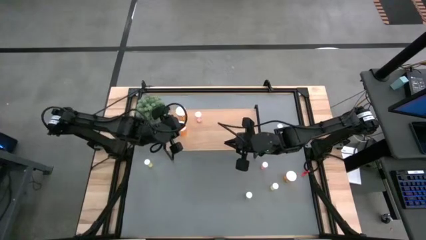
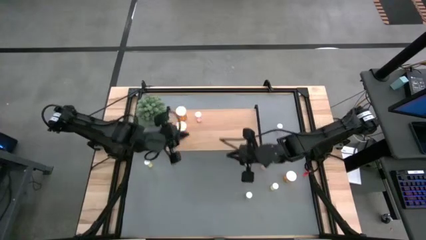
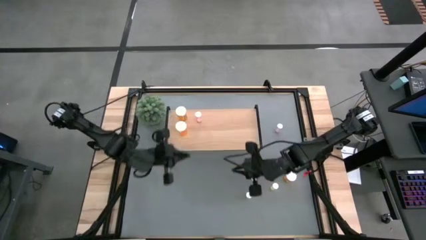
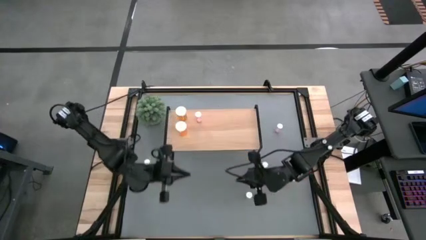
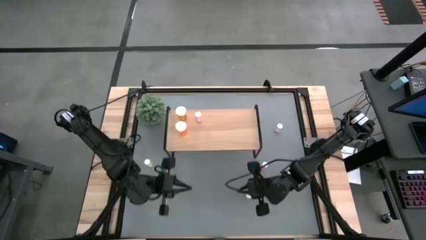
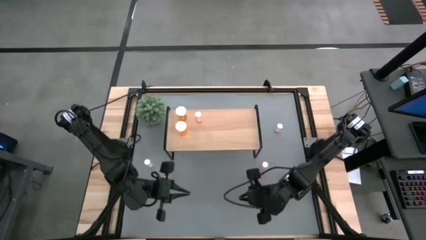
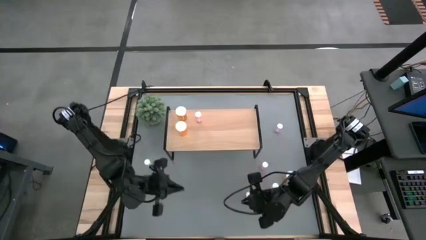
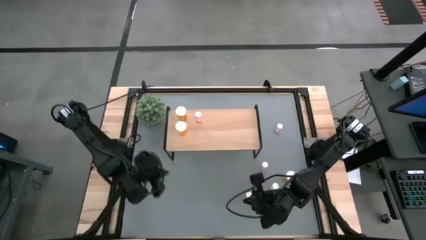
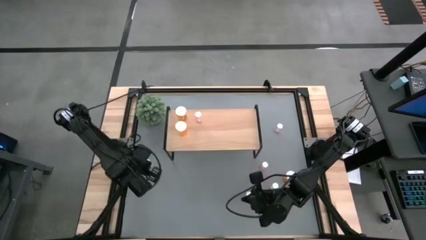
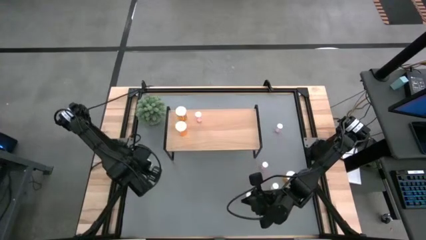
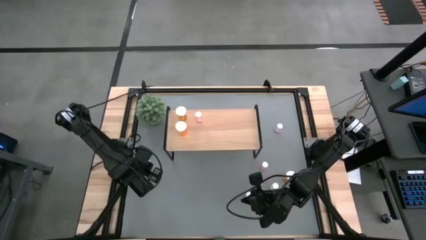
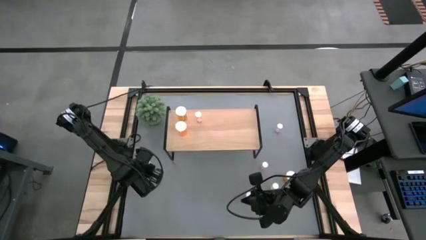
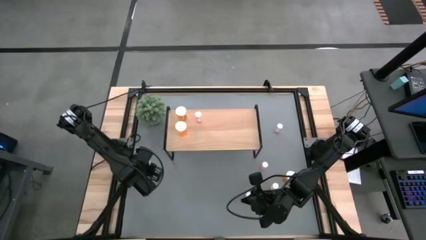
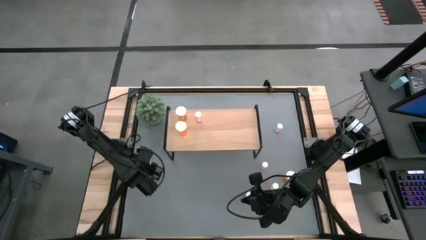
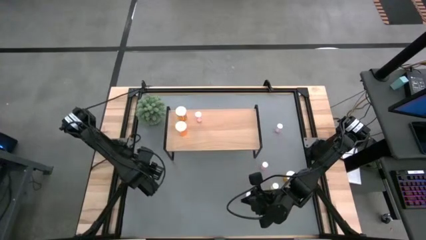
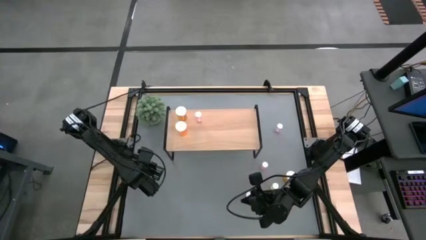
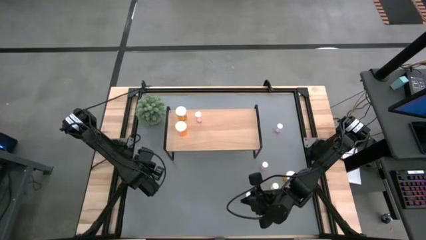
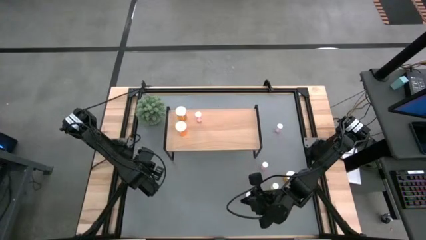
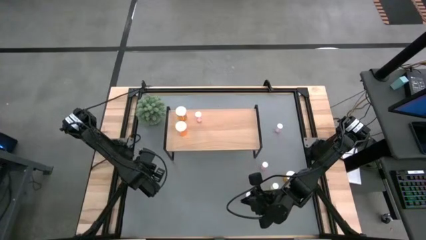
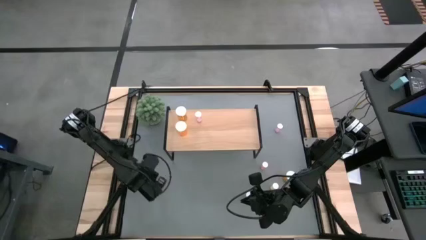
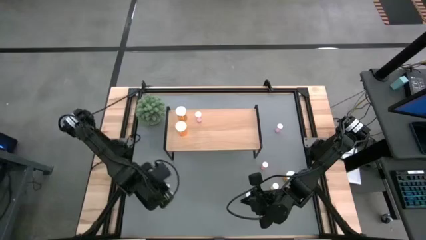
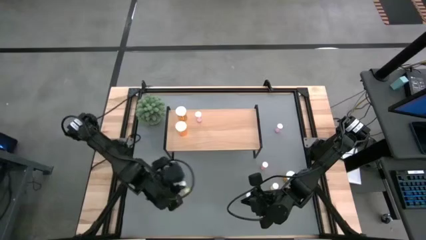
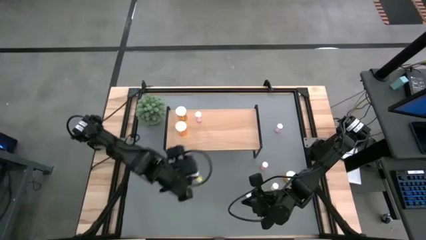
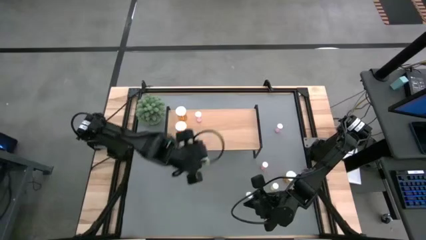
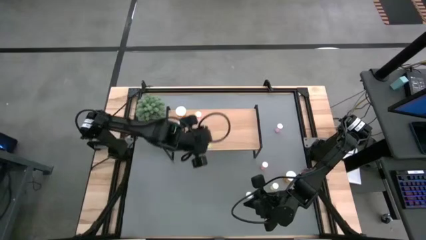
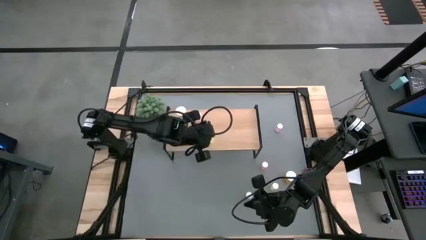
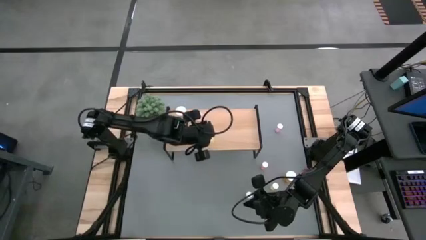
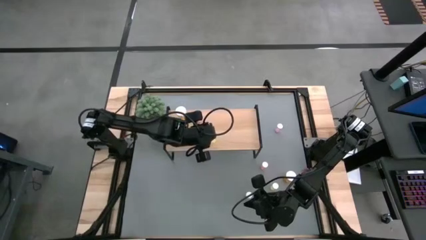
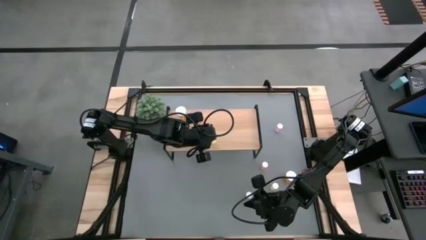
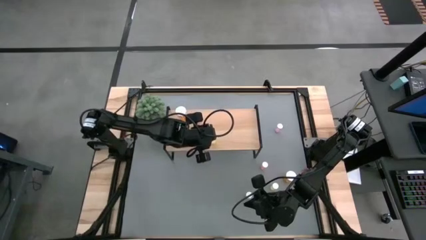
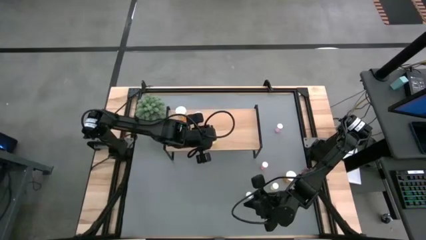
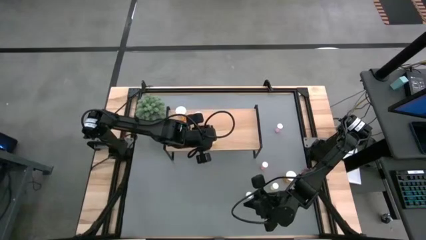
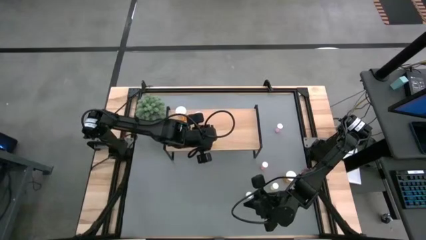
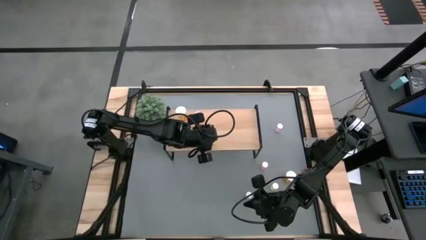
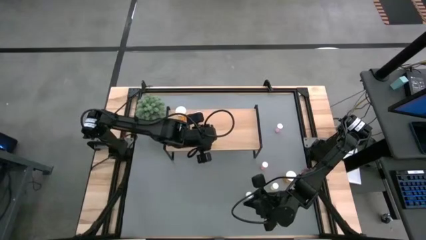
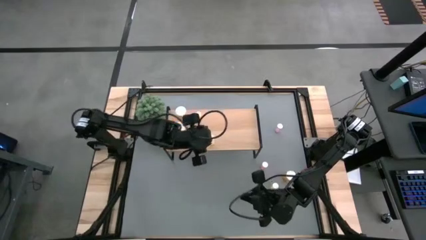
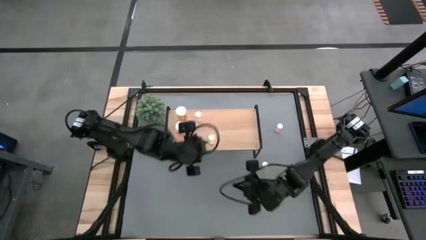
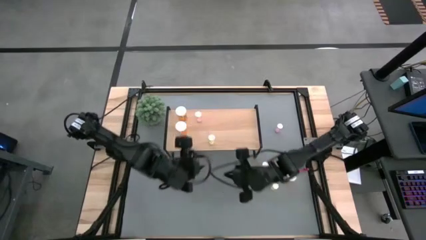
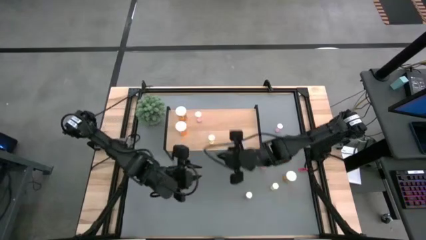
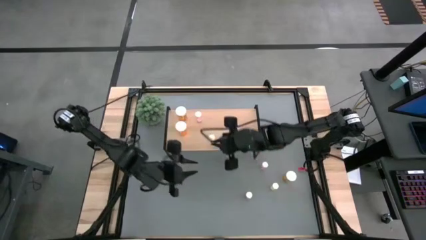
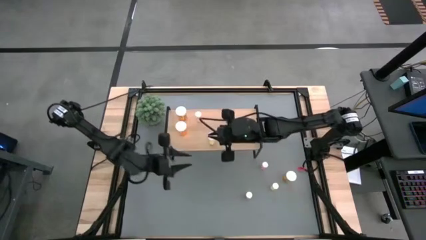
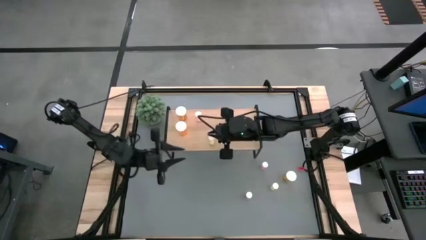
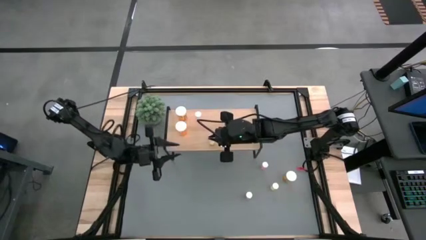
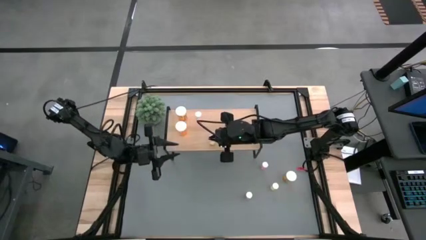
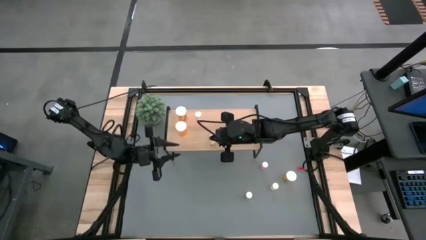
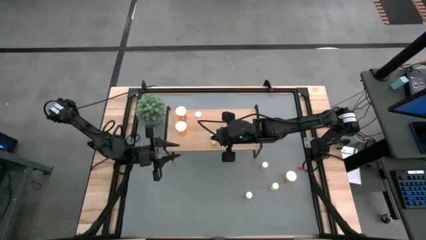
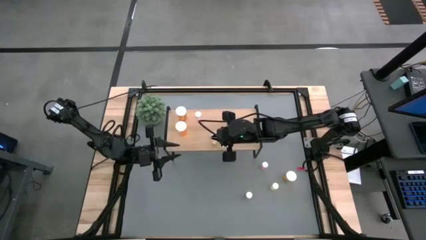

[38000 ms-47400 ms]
Task: Pick and place medicine bottles onto shelf by color
Put the top yellow pill bottle on the shelf

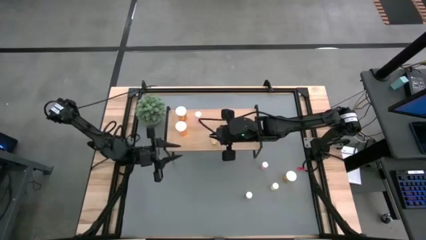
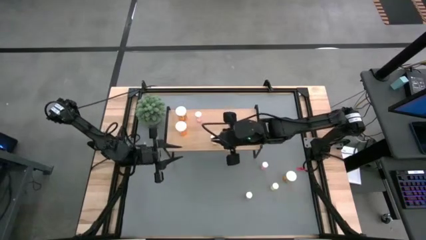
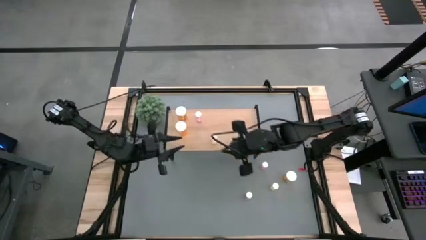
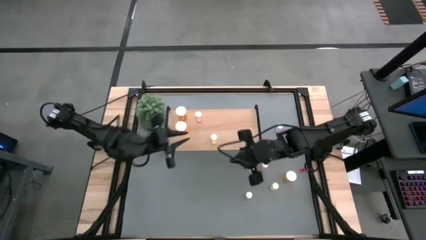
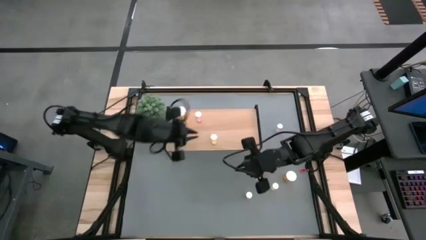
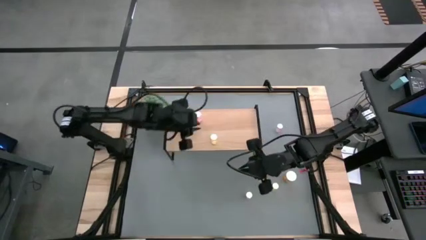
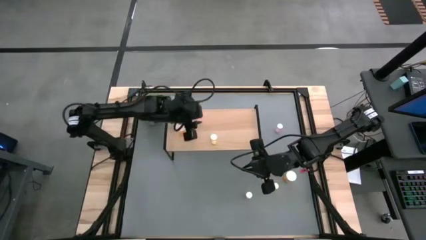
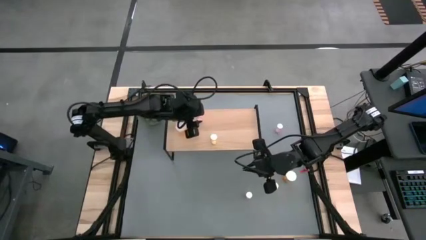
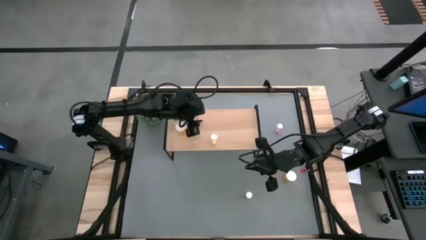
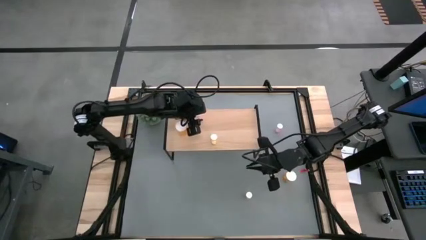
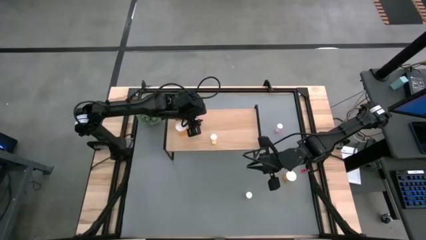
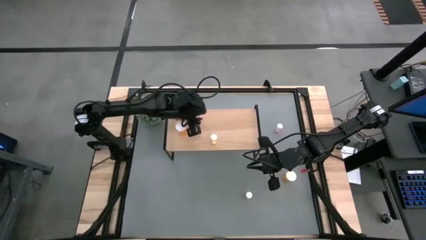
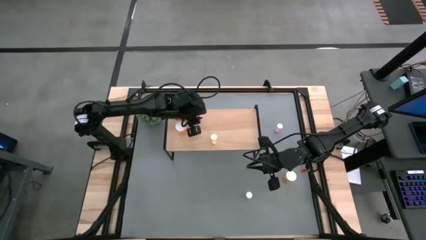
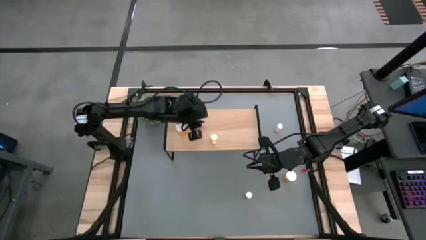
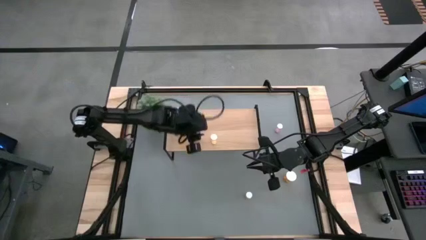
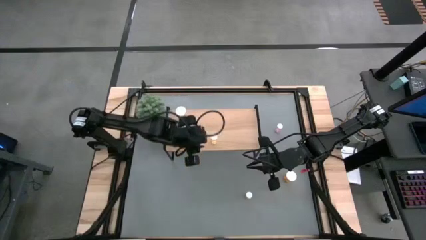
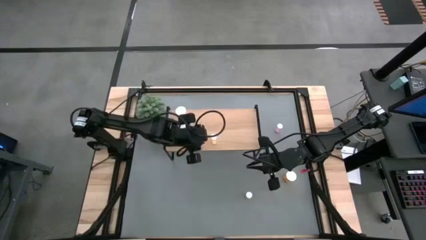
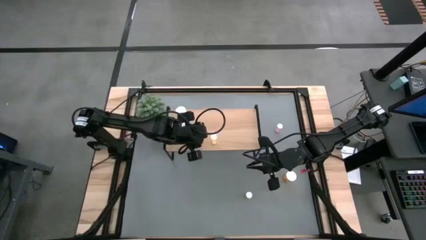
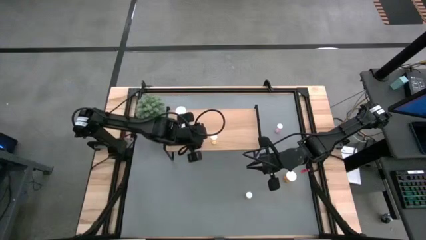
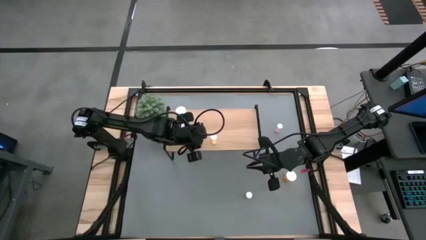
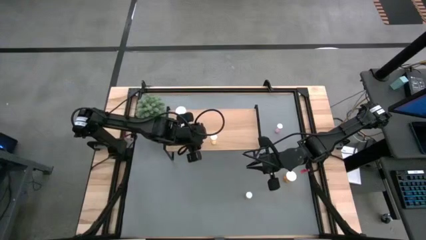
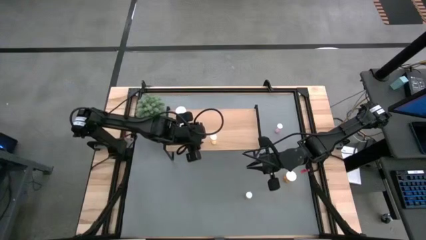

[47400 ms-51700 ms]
Adjust the purple pill bottle on the shelf

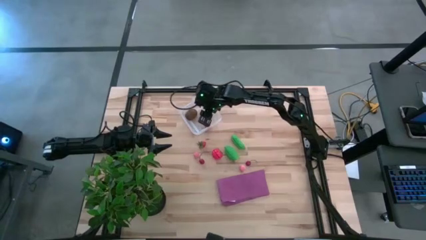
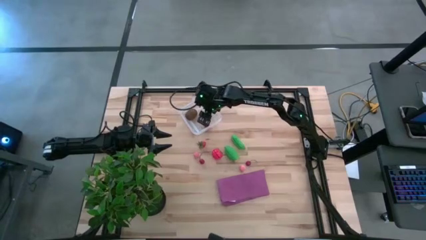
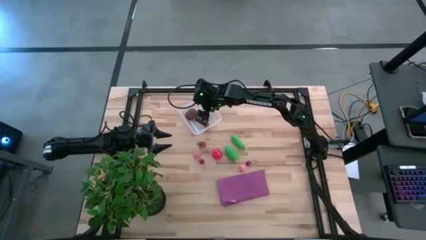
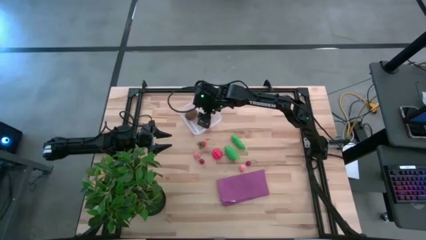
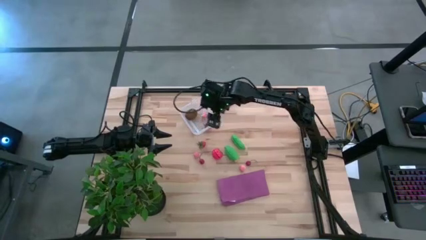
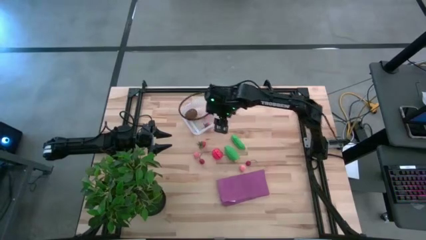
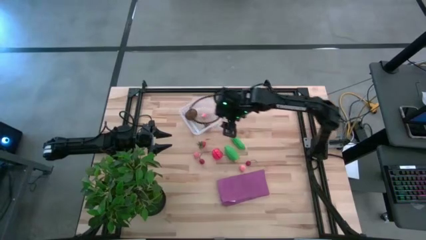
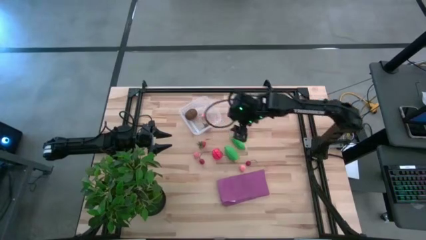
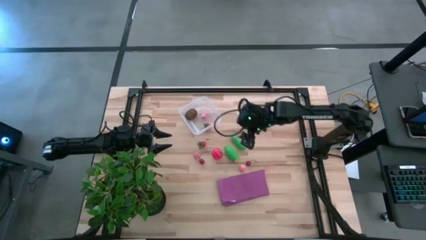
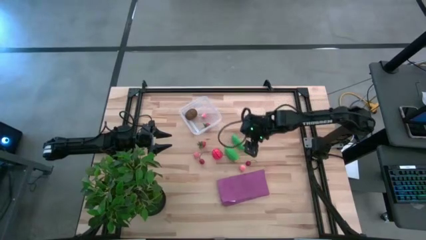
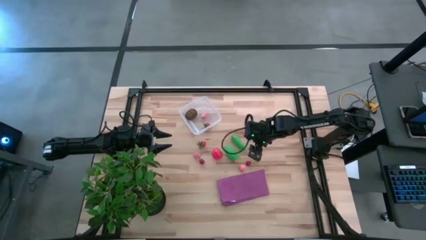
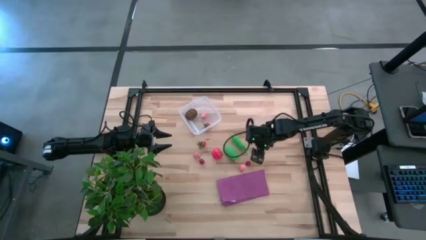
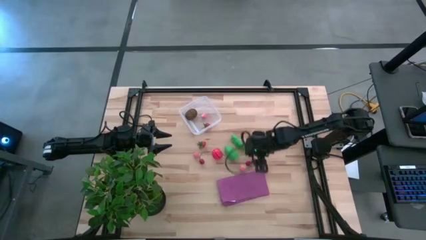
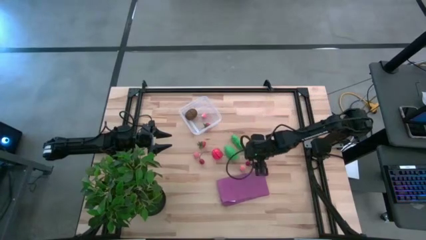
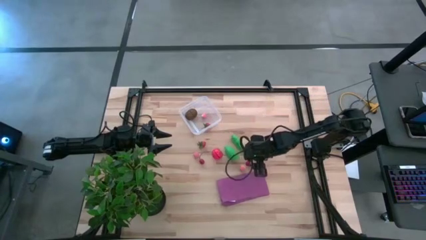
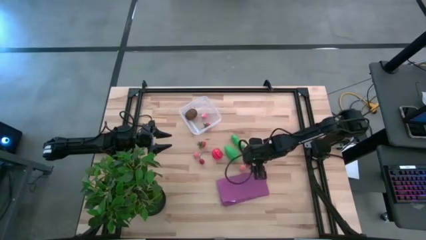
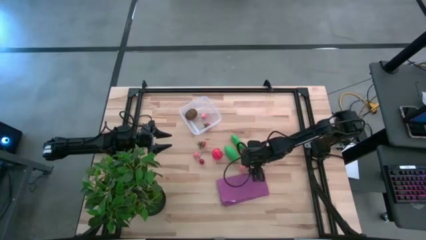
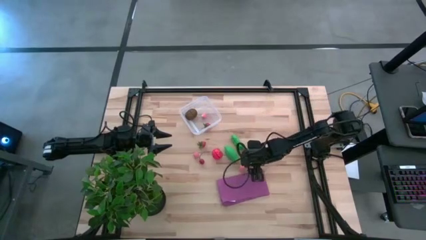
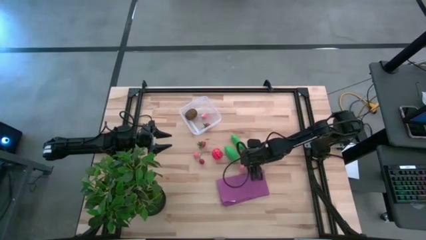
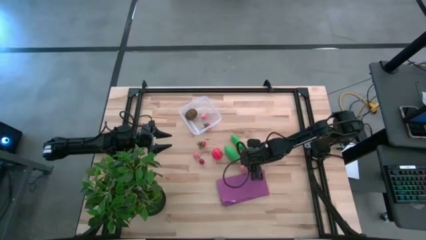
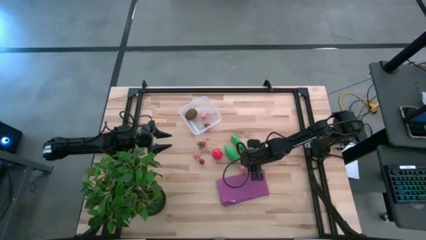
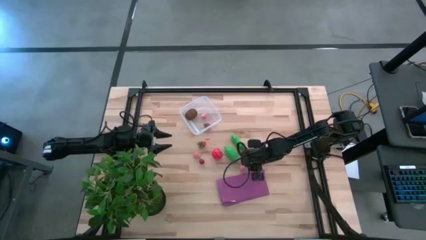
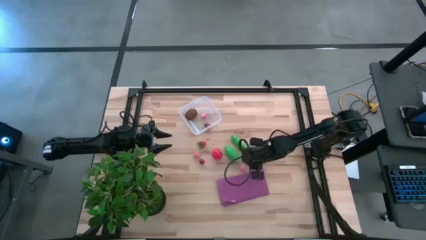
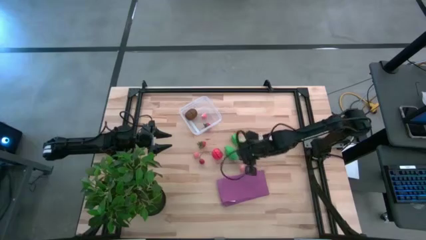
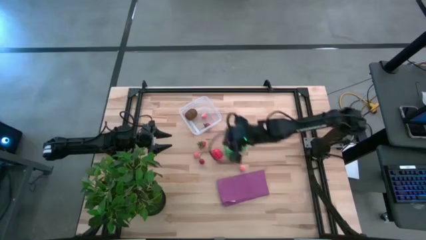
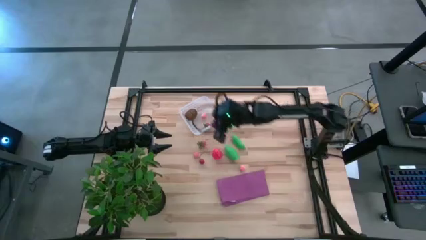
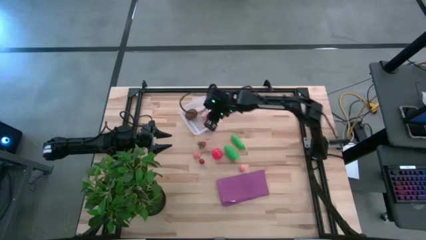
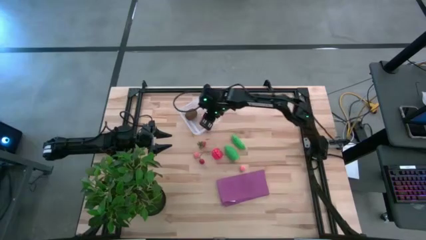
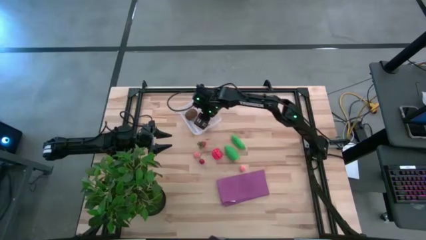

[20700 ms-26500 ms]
Task: Pick and placing Produce into tupperware
Put the right red cherry into the transparent bin
